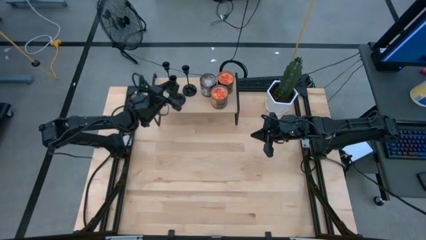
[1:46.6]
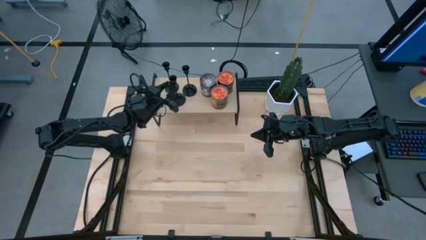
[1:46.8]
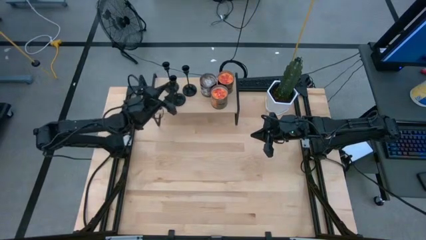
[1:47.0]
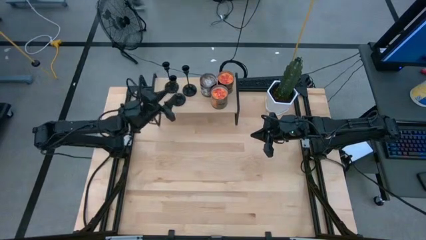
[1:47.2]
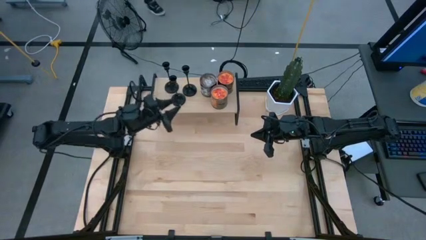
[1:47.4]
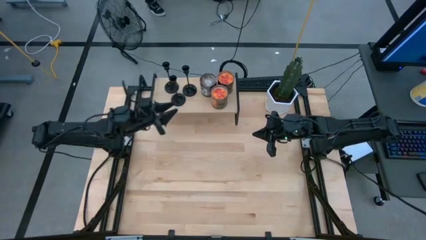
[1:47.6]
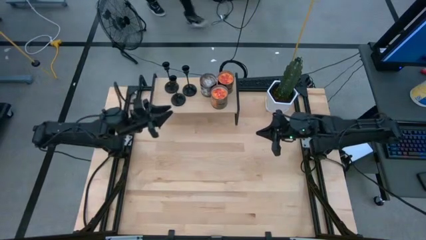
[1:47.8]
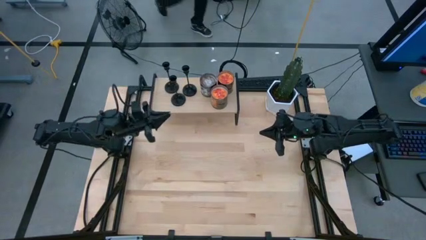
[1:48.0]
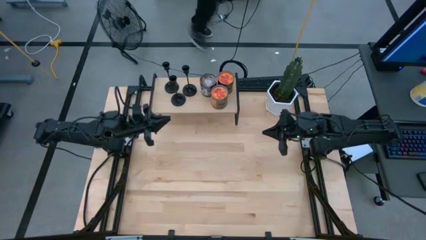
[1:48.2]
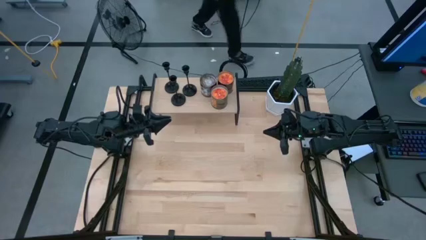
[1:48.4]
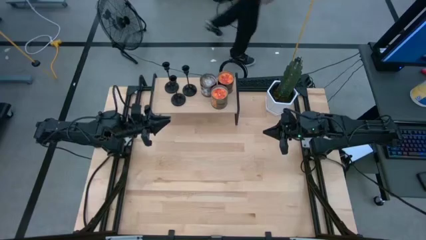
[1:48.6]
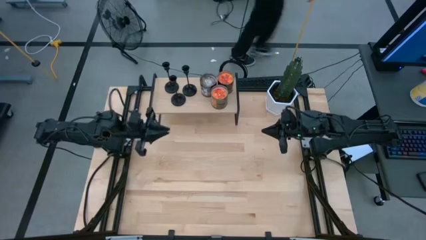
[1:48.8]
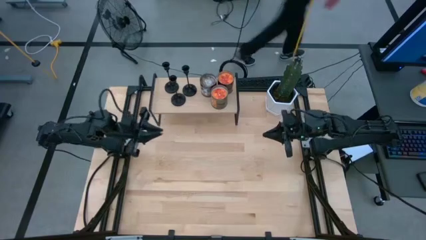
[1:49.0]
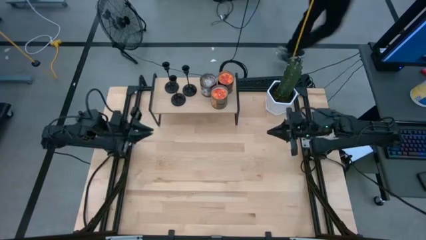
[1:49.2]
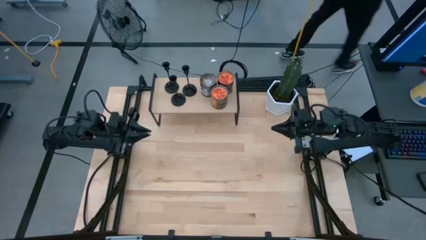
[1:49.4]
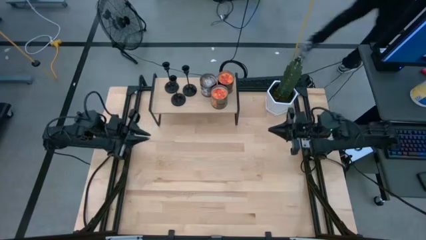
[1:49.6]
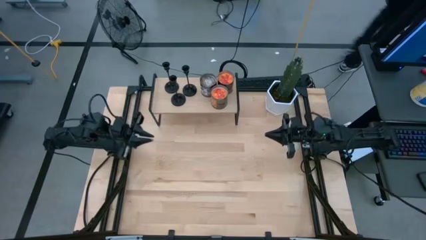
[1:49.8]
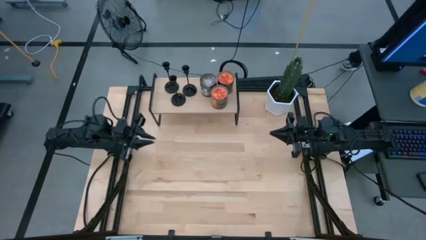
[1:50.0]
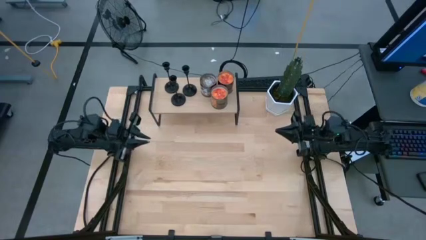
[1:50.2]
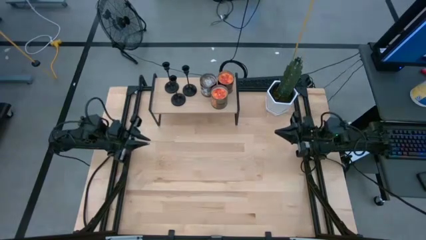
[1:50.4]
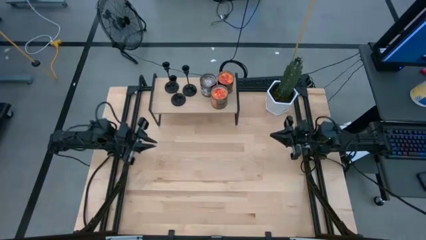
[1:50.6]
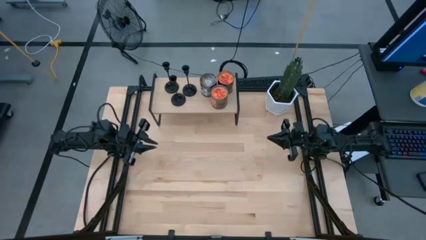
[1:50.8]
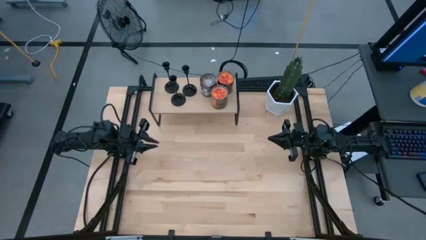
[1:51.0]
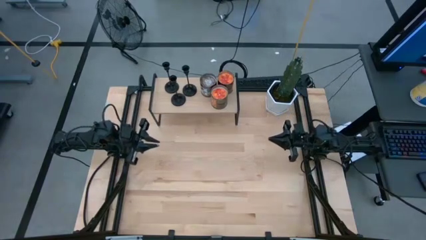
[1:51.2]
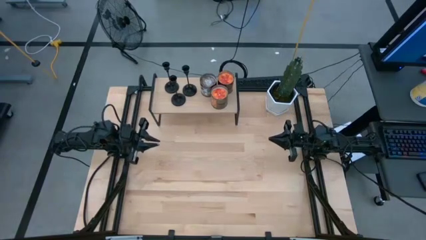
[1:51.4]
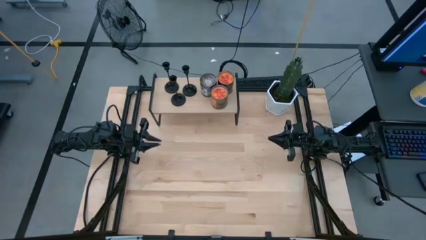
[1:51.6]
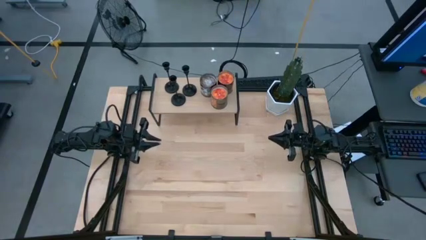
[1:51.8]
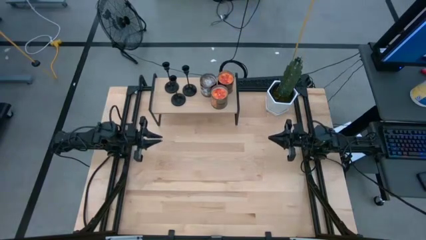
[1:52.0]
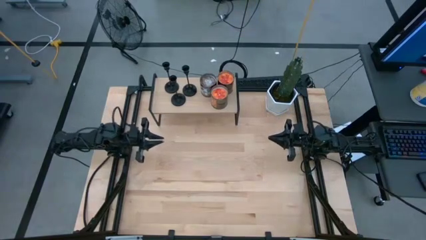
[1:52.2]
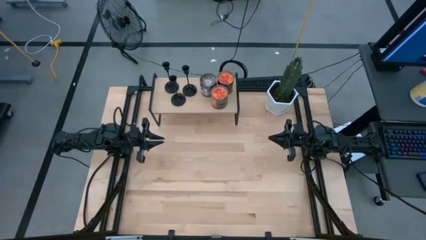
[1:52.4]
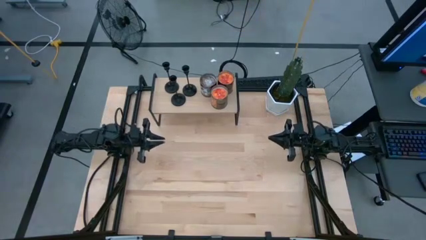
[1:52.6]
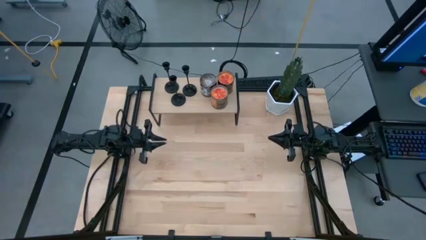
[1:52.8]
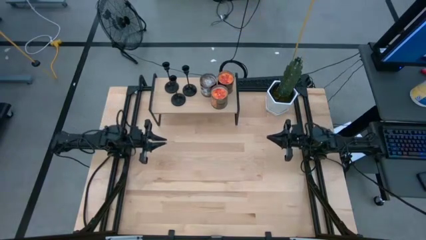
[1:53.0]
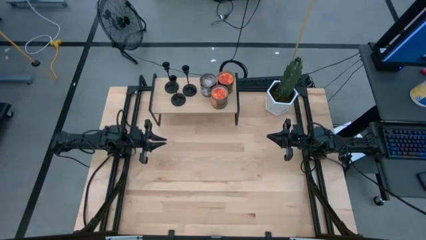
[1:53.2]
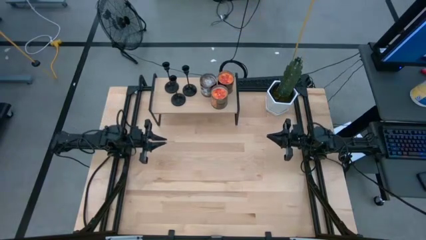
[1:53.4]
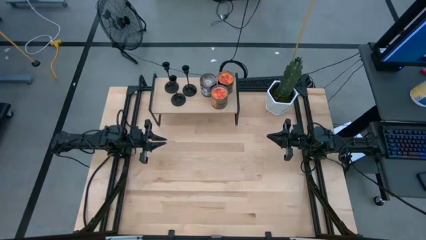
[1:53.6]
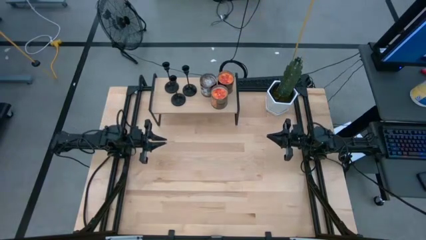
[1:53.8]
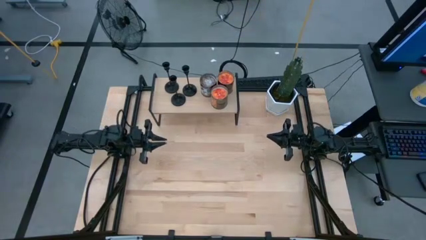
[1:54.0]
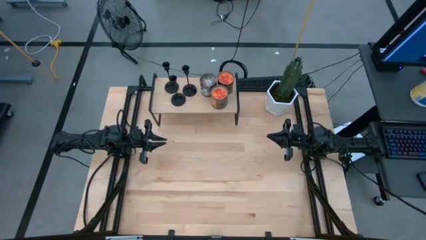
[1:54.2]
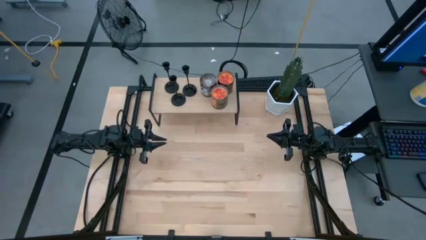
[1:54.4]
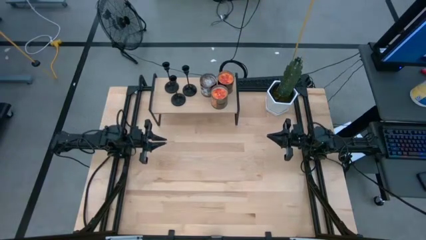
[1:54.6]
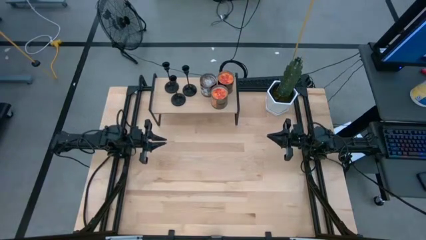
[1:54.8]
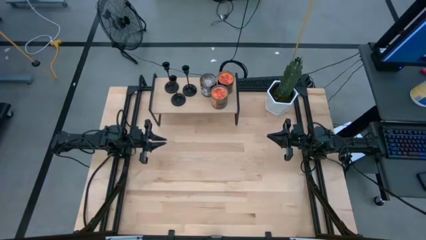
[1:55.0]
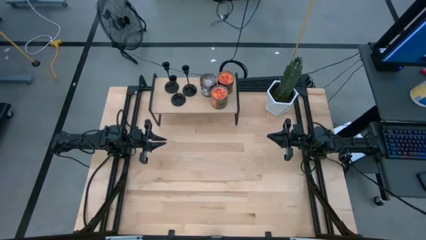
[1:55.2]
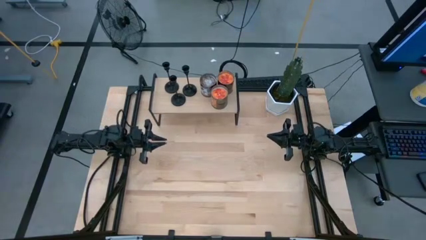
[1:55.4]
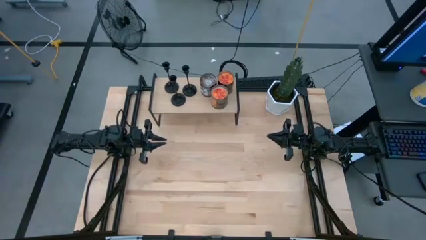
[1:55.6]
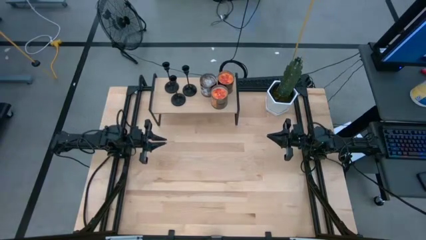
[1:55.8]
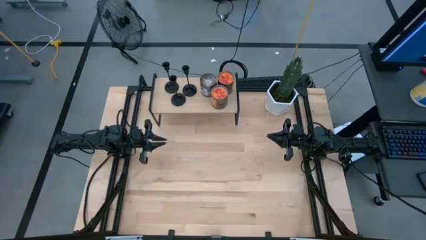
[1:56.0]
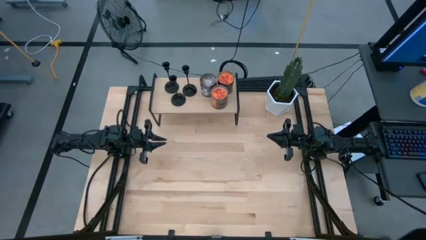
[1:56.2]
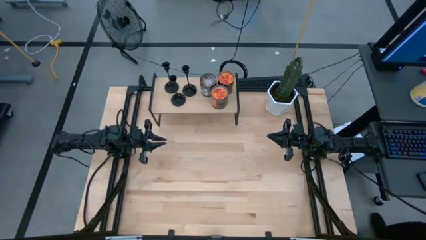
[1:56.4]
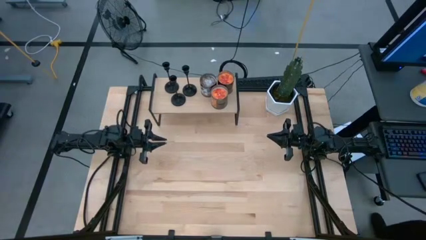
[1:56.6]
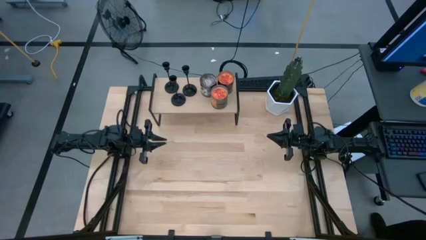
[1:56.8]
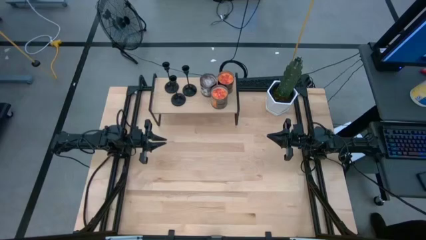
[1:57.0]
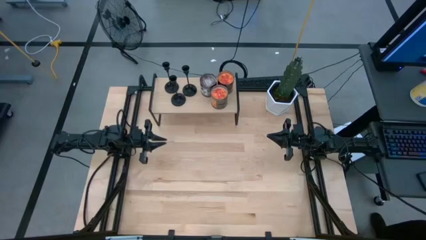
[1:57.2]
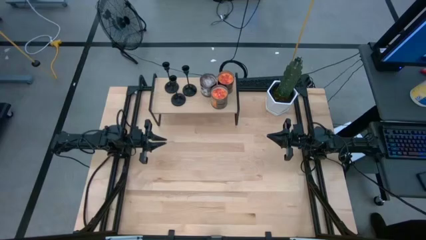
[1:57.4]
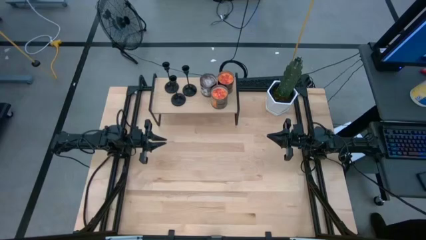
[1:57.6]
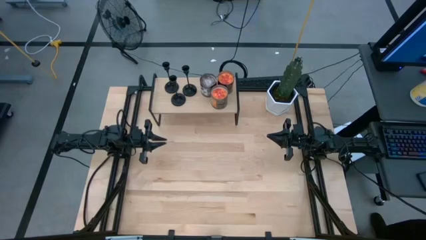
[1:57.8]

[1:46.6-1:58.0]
Task: Pick & Place candle stick holders
Return to Home Position

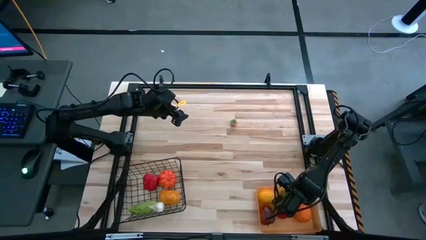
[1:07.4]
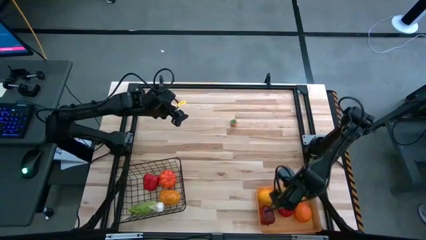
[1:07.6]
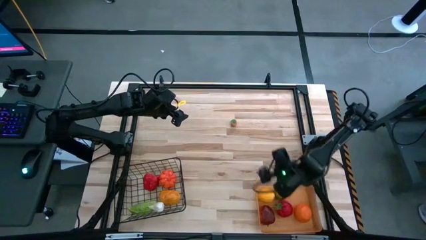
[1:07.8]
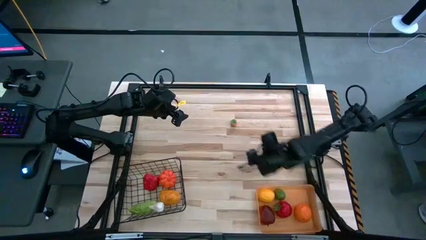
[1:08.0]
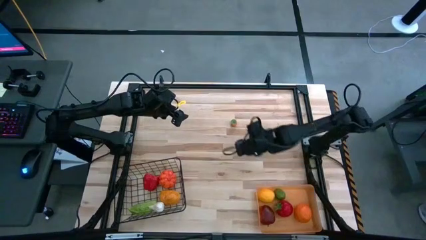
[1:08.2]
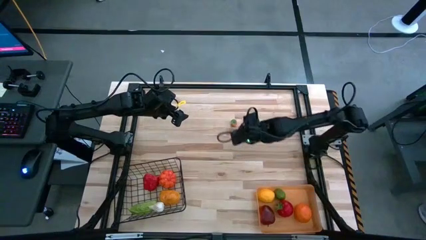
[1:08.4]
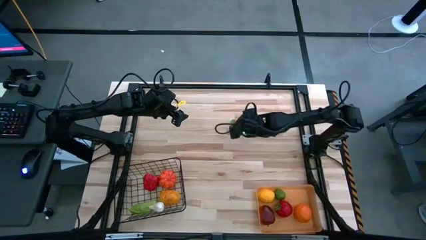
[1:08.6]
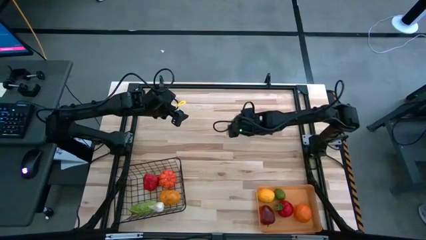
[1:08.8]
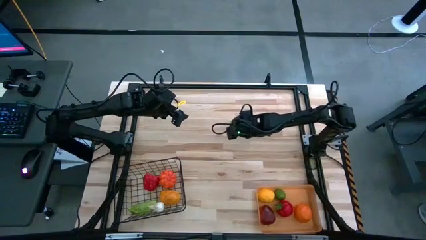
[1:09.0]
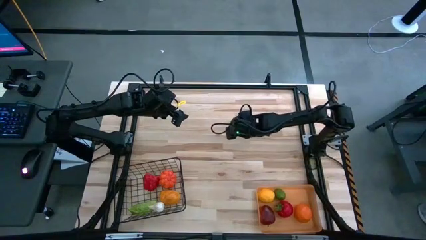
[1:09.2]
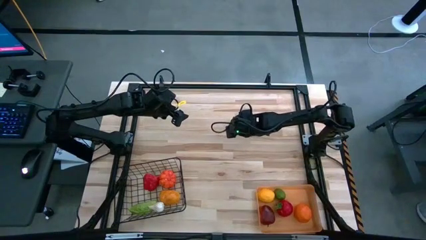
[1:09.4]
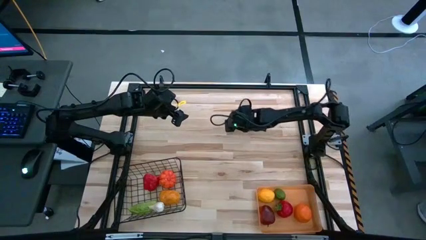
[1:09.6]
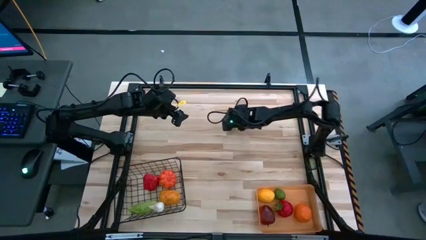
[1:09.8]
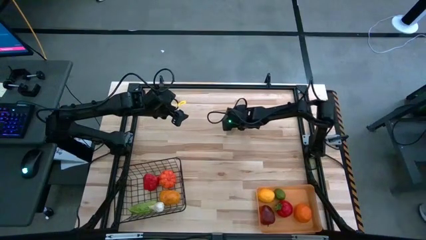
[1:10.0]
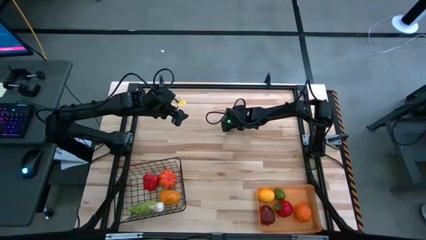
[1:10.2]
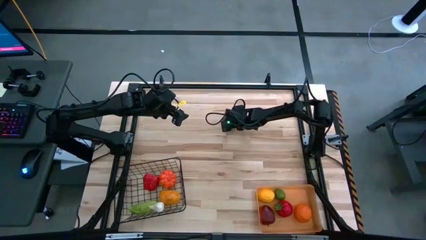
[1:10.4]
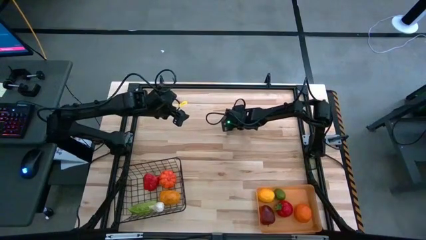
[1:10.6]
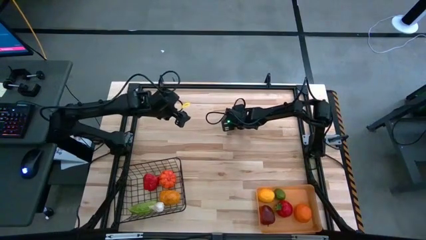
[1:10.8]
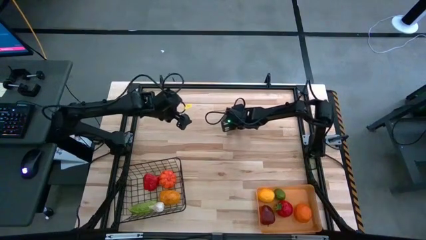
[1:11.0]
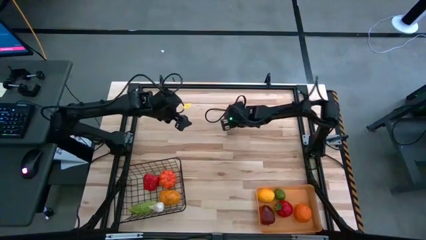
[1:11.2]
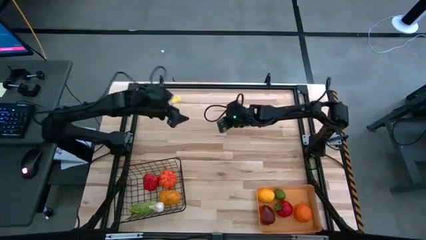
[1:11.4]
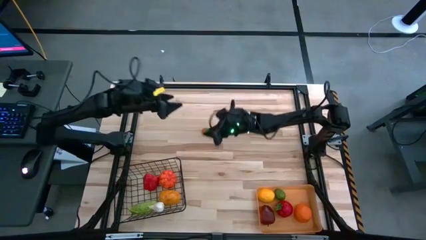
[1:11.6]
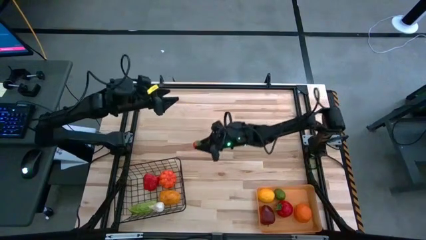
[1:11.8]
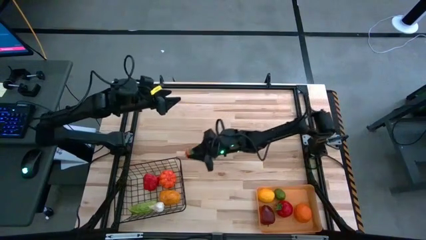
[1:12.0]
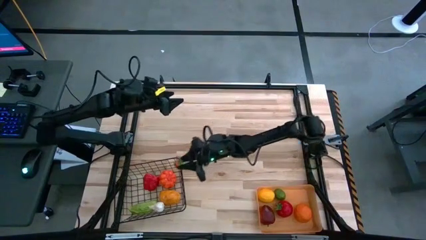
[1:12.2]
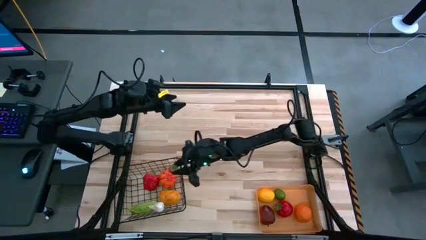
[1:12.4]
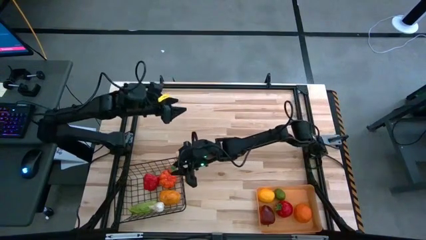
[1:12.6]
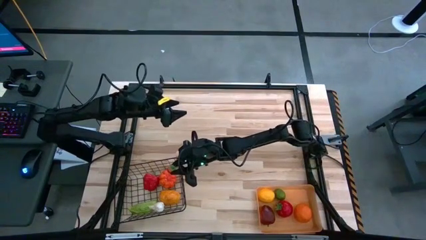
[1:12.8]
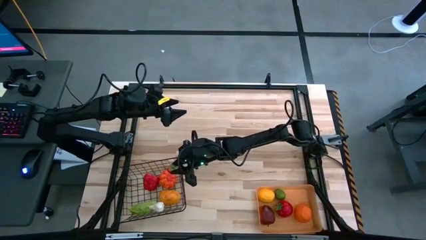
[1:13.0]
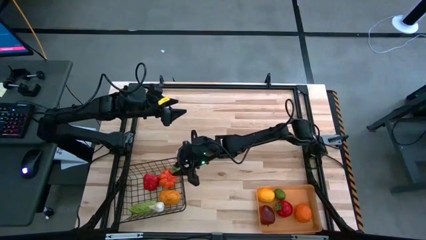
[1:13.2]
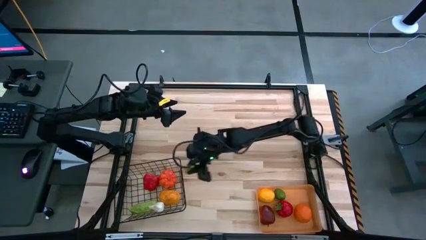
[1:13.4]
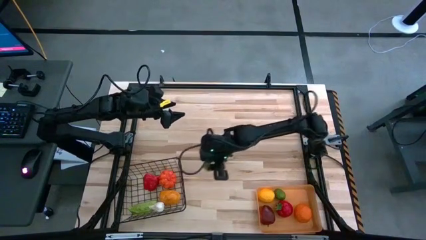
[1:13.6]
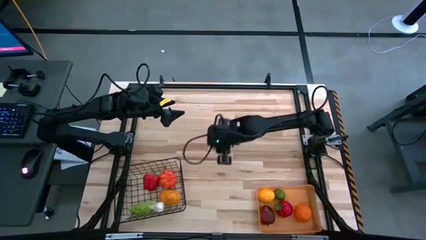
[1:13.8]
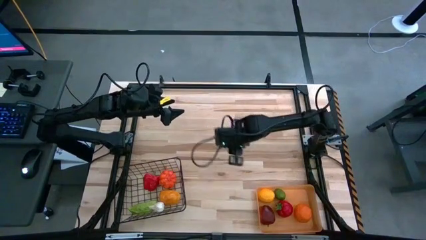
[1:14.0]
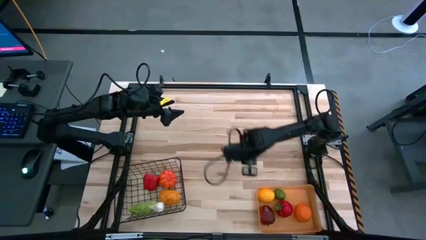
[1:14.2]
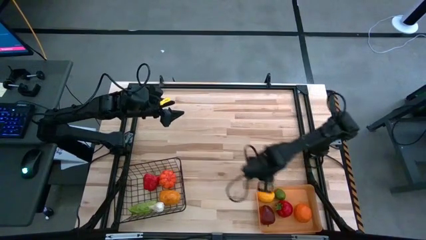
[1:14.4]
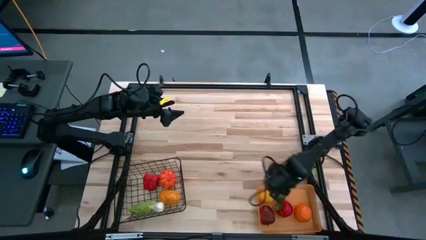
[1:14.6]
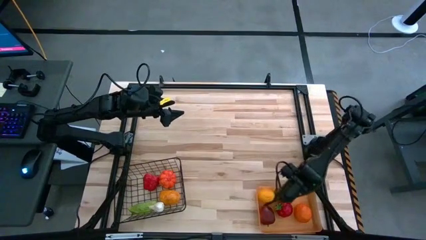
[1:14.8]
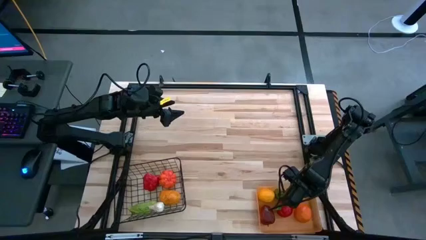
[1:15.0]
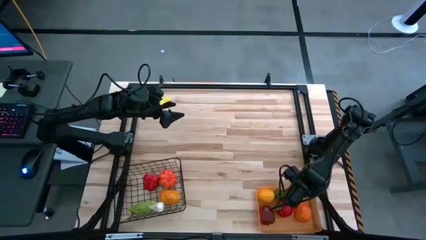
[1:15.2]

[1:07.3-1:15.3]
Task: Sort produce into baskets
Put the red strawberry into the orange bin
